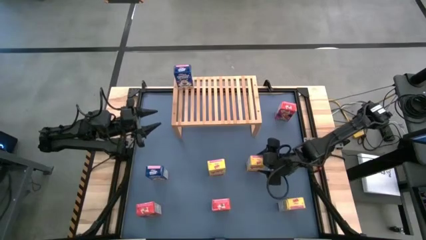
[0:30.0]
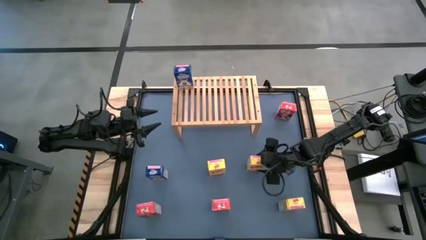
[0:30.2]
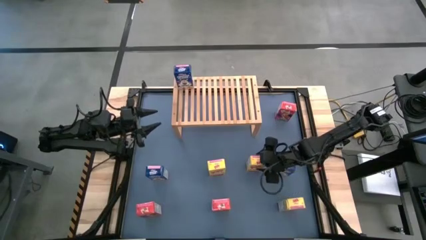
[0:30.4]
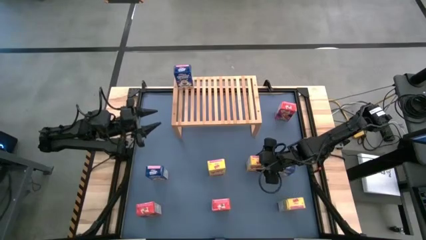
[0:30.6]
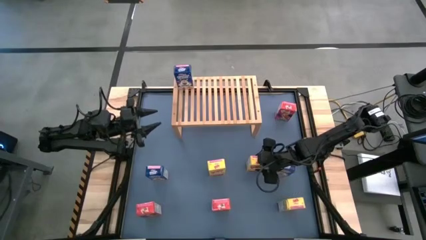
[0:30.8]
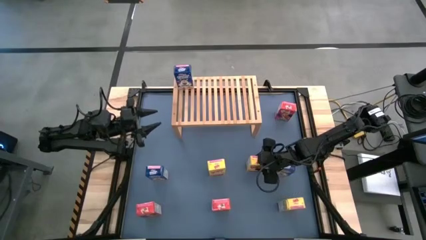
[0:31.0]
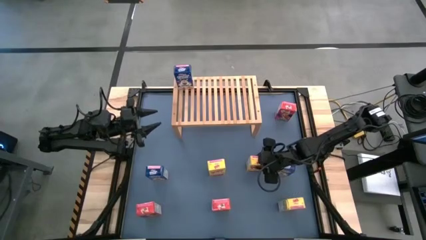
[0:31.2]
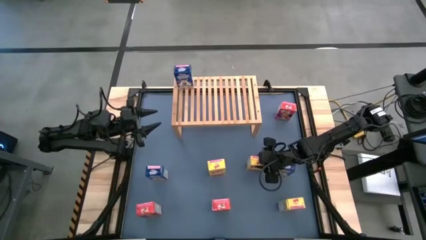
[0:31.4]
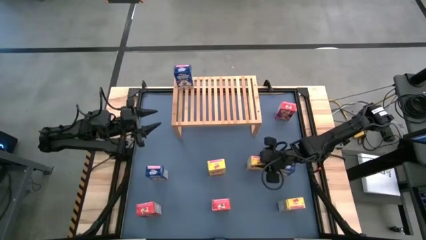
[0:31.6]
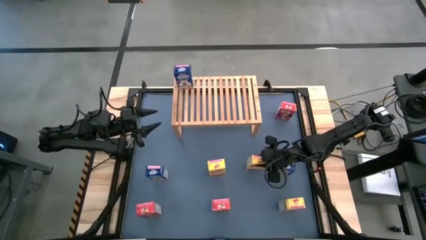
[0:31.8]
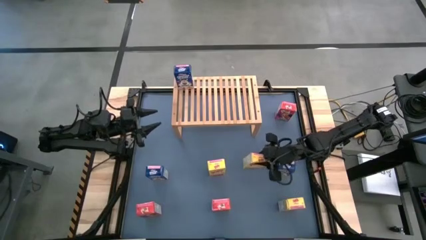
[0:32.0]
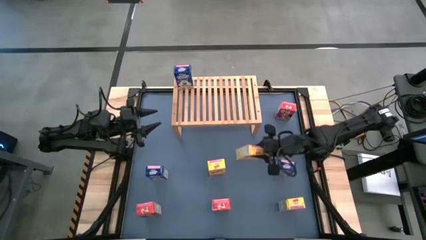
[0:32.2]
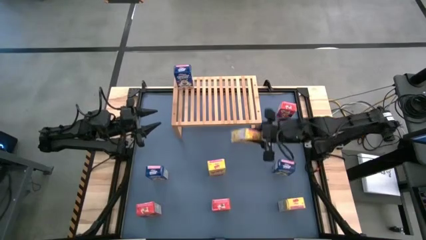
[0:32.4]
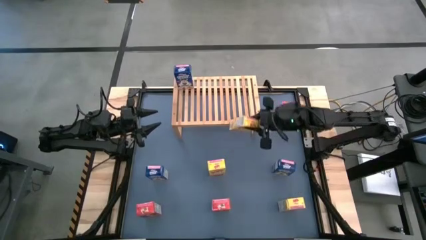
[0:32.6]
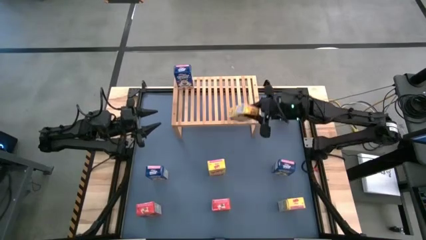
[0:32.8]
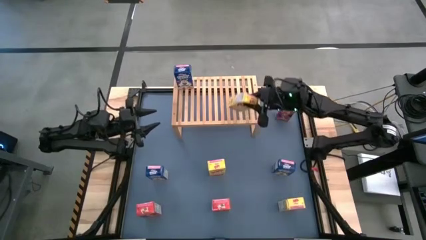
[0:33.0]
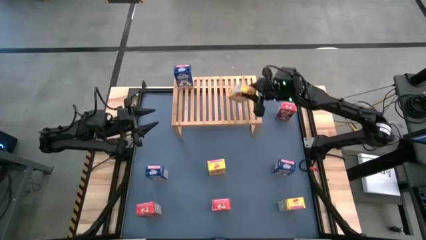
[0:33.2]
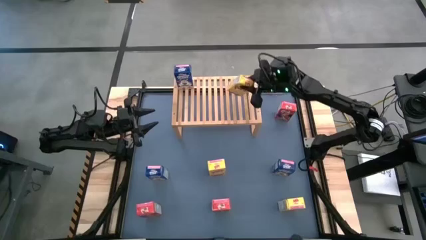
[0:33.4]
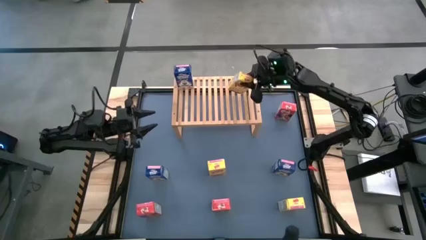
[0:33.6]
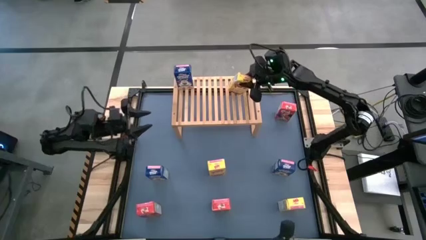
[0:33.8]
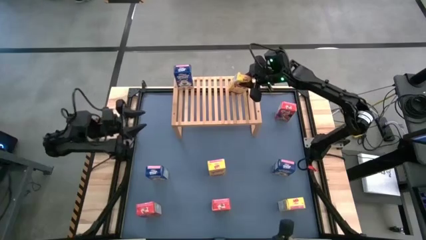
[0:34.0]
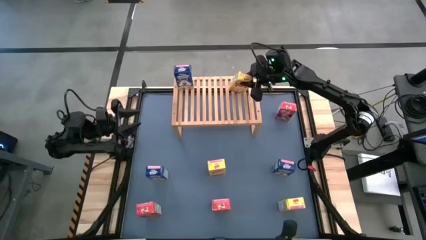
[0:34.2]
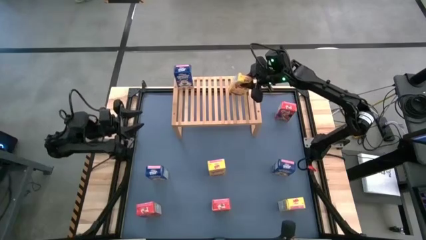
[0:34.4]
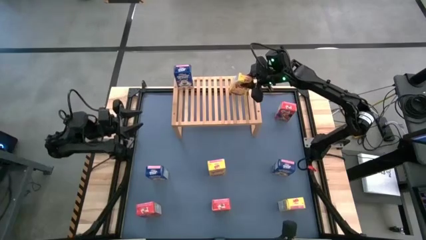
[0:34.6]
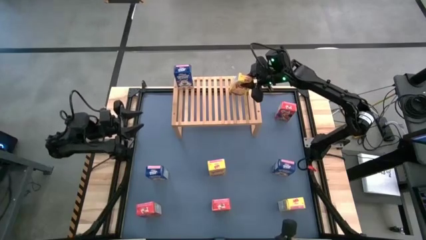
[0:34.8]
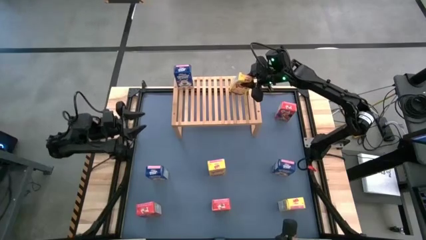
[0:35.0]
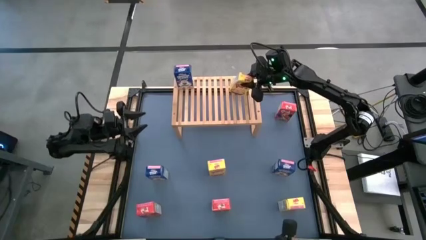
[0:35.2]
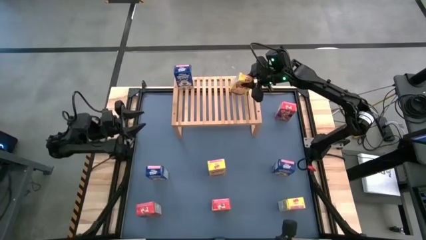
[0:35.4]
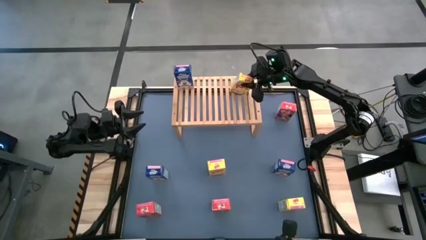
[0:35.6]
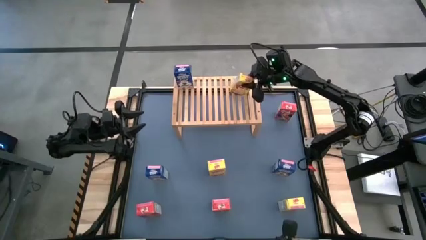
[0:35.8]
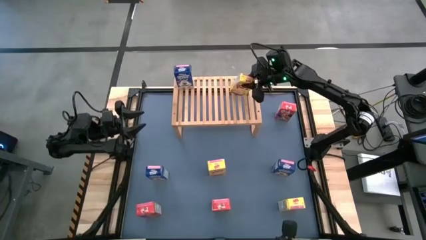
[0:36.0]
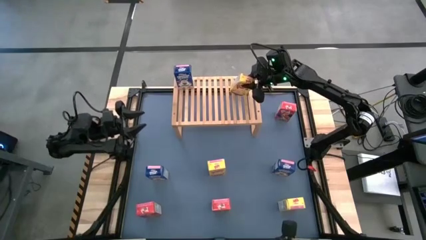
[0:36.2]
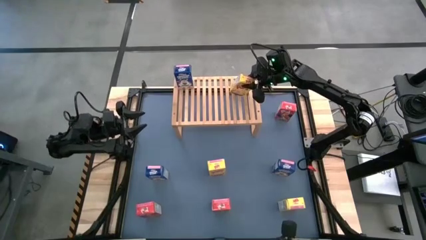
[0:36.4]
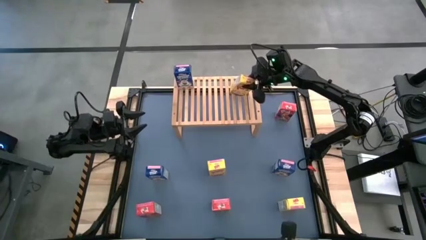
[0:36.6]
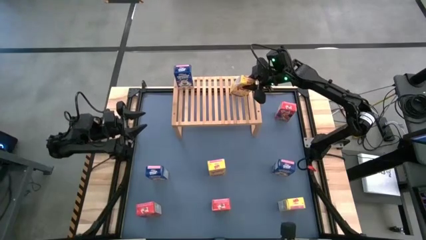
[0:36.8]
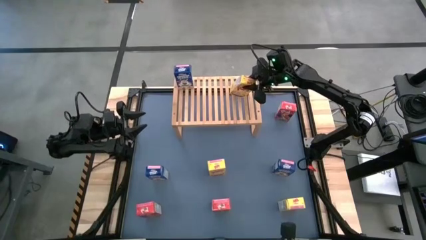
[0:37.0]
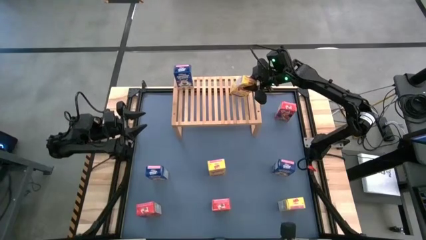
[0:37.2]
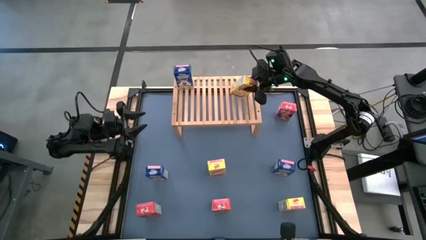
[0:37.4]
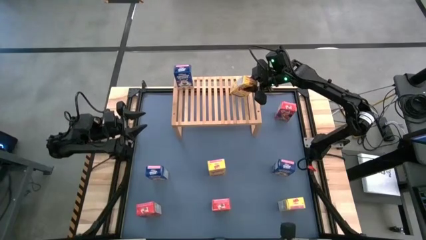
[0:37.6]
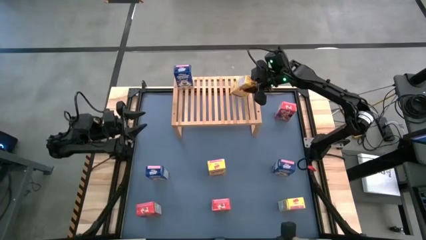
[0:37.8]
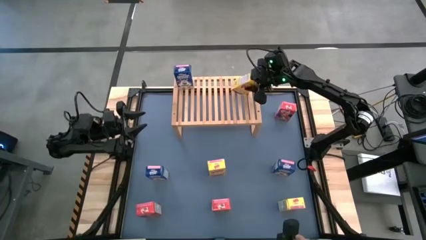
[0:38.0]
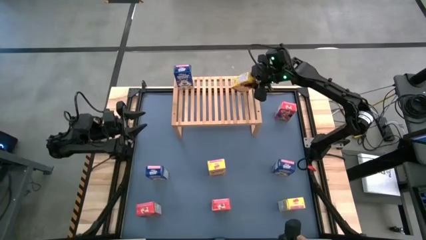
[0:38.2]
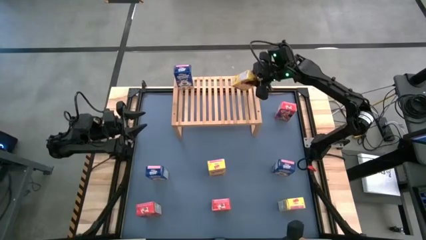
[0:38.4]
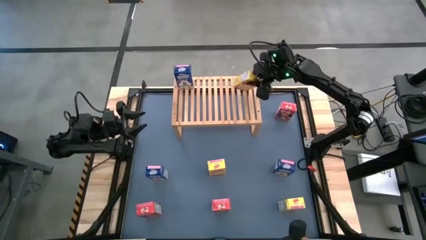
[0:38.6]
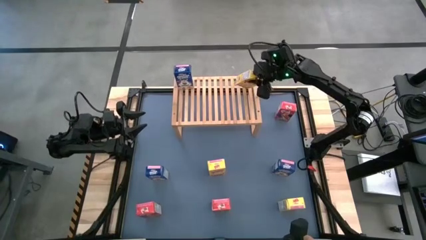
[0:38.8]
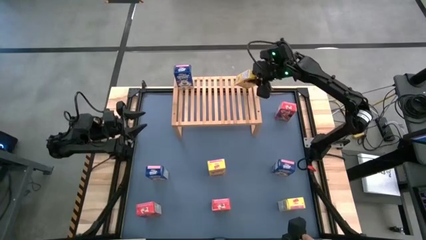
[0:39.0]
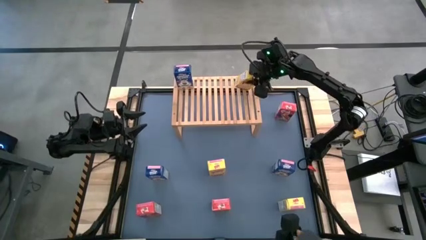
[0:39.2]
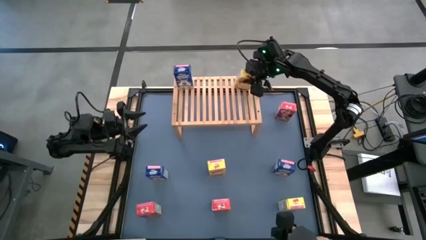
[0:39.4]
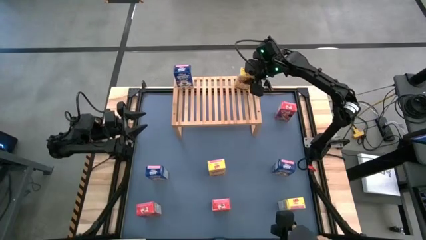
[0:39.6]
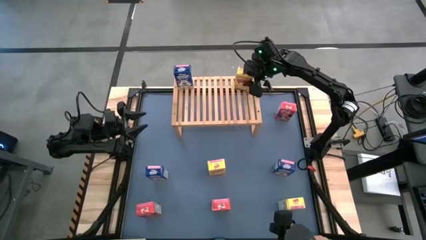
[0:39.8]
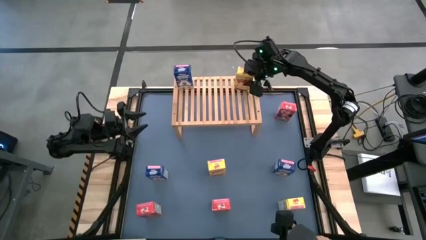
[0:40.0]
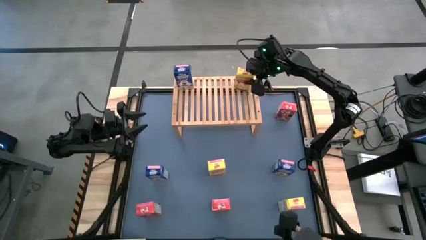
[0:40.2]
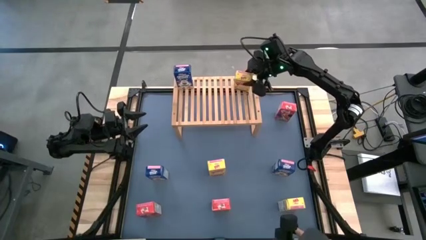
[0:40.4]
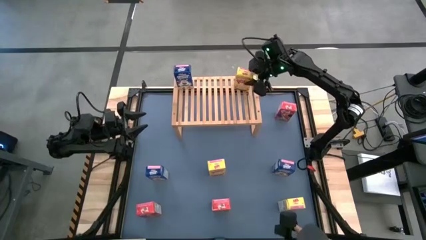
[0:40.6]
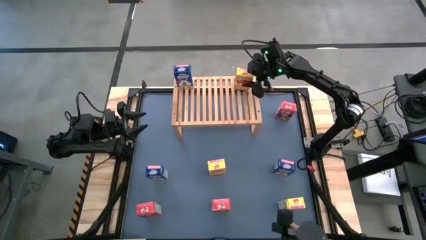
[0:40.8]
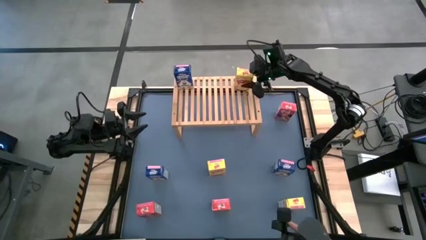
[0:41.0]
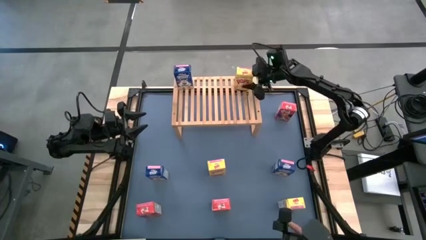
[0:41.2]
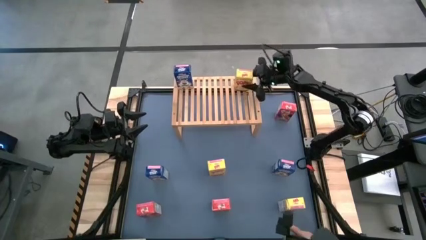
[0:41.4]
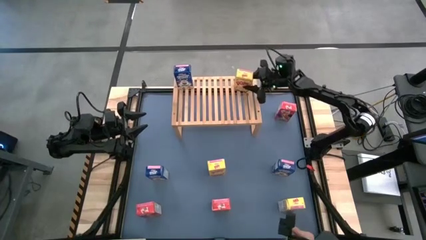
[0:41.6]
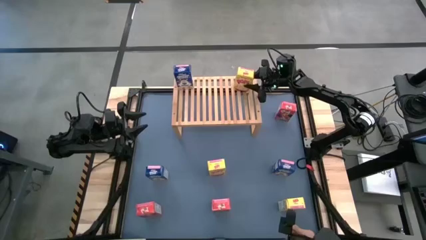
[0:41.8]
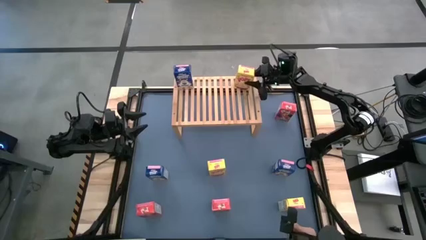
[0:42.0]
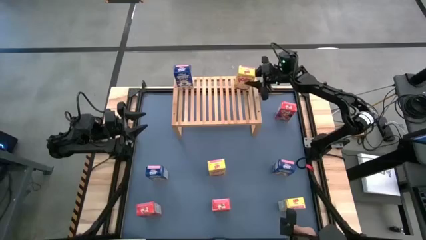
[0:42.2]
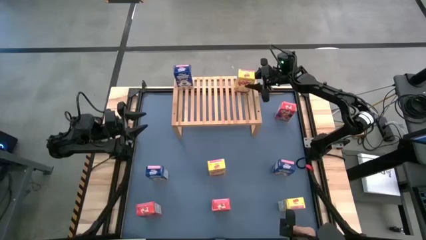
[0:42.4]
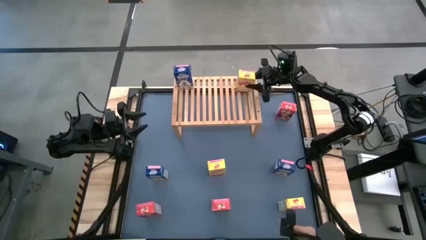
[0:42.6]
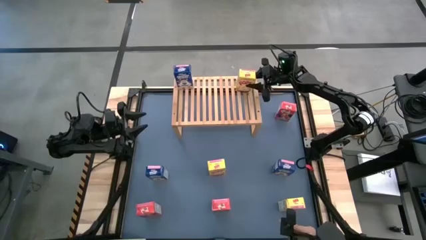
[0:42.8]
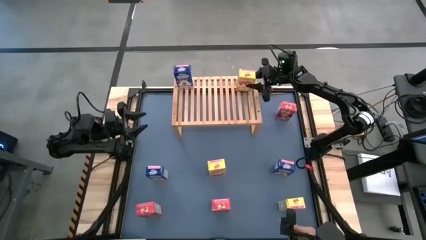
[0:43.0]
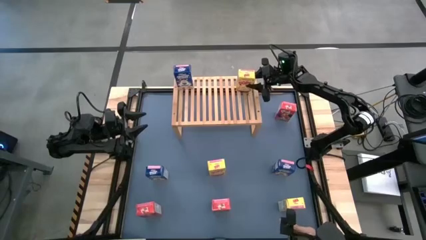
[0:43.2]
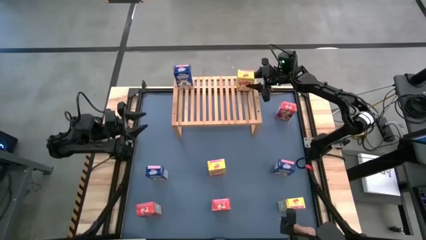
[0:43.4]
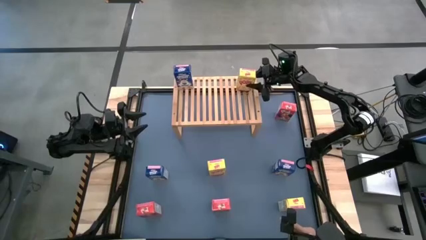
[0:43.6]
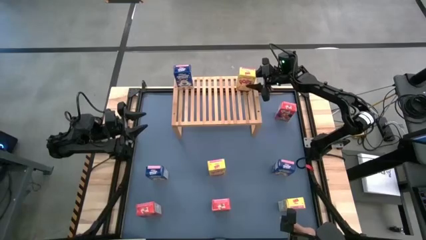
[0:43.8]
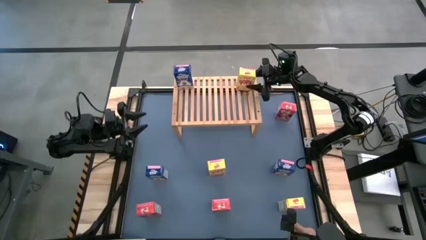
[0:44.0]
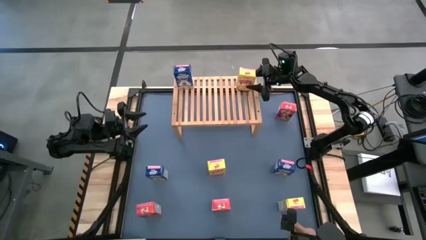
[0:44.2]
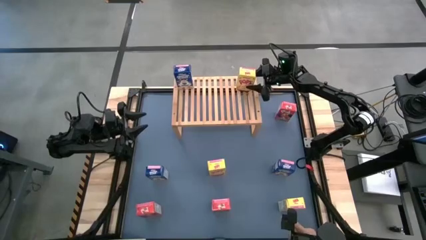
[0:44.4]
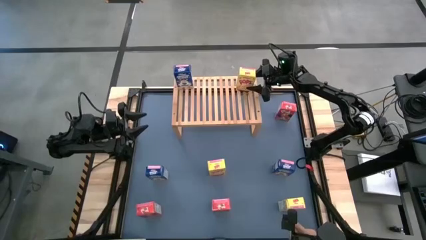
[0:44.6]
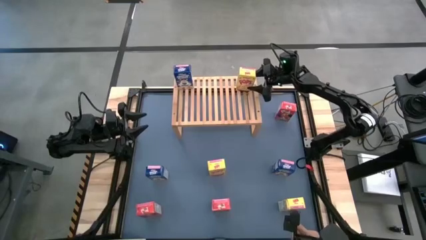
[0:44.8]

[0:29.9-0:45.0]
Task: Stack cereal on shelf
Put the top right yellow cereal box on the shelf

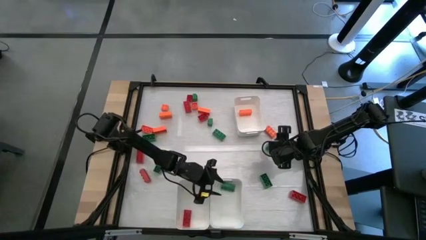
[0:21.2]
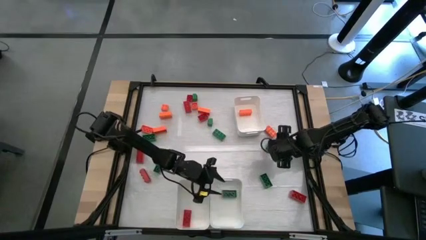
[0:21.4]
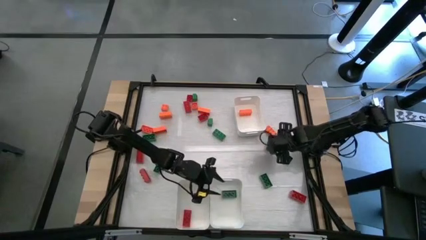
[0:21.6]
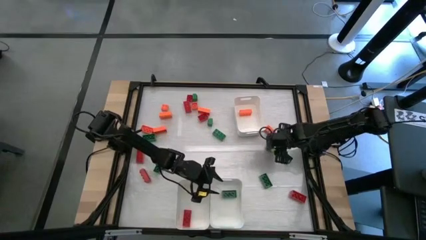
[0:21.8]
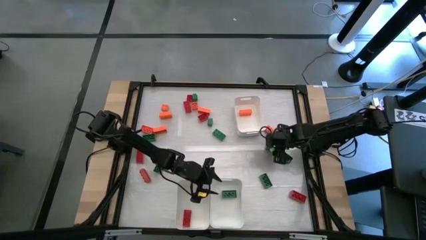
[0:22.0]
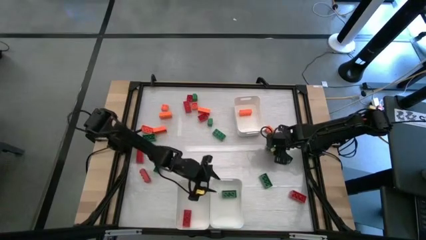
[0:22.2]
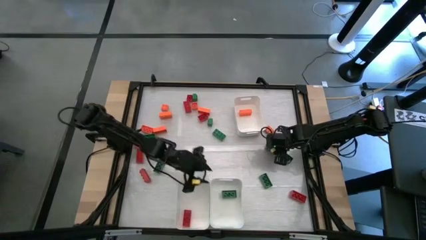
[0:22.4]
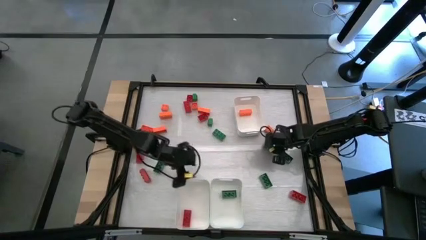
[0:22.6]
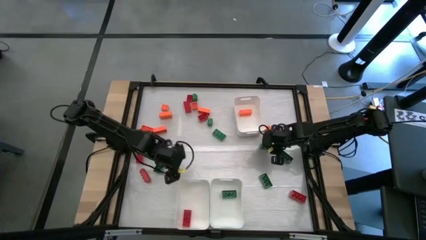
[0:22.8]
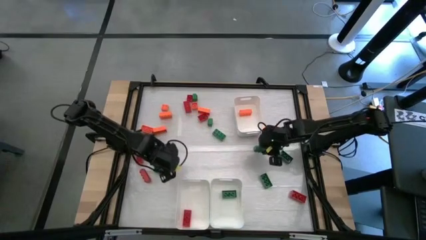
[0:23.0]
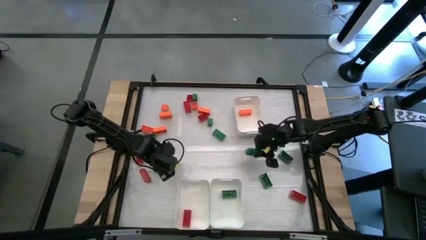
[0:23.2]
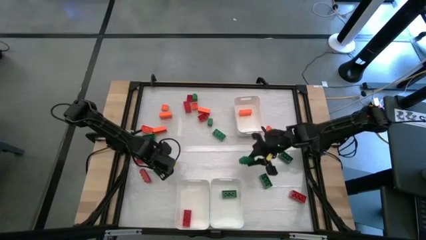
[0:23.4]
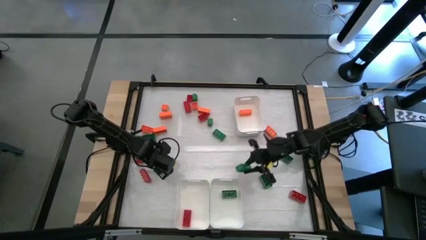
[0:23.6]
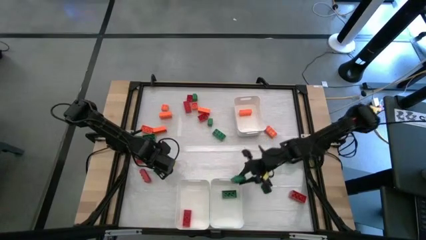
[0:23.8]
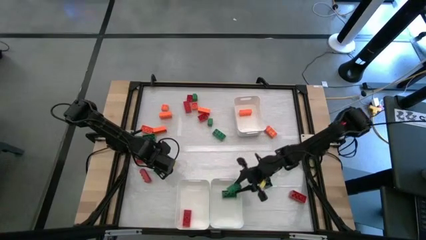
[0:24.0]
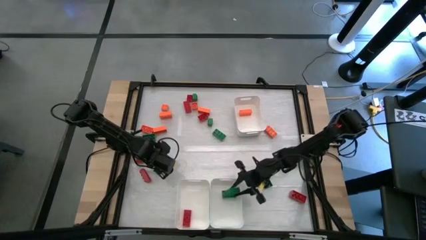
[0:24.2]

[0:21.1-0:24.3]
Task: Sort blocks
Put the green game piece into the bottom right white bin
